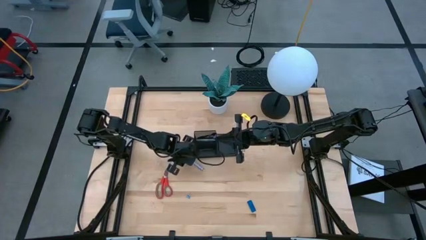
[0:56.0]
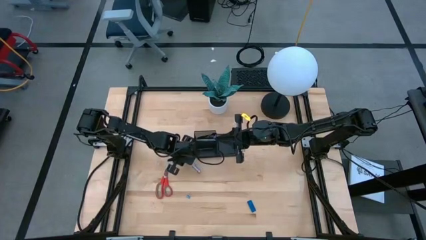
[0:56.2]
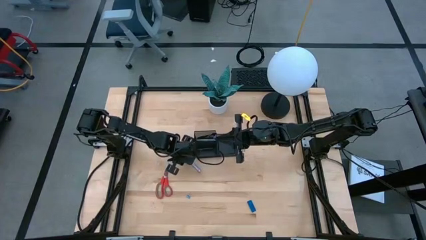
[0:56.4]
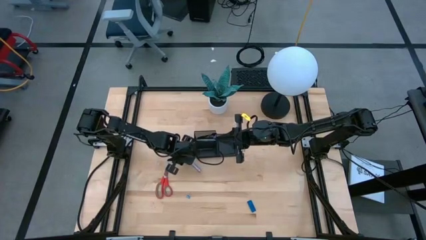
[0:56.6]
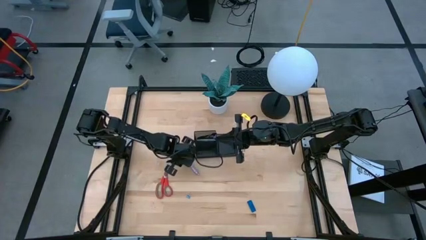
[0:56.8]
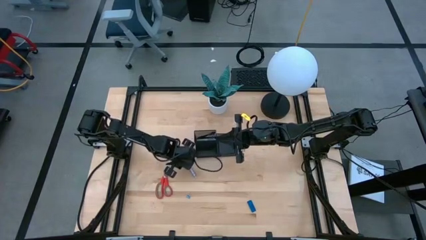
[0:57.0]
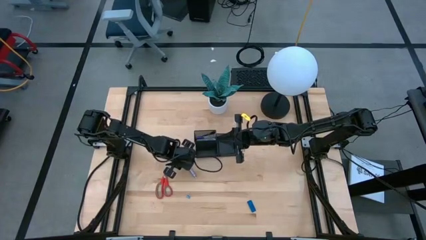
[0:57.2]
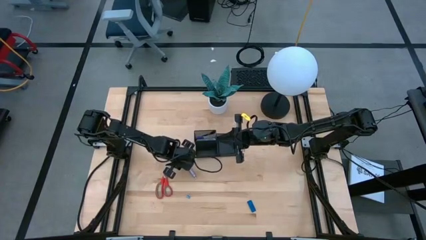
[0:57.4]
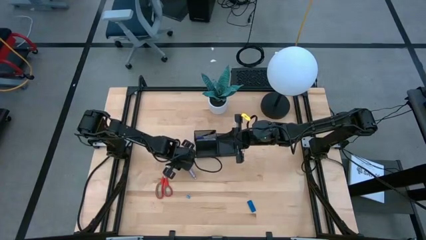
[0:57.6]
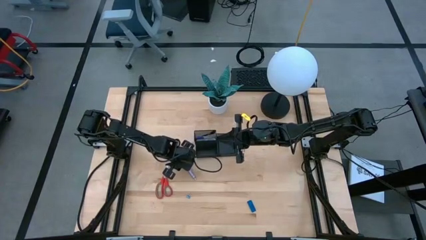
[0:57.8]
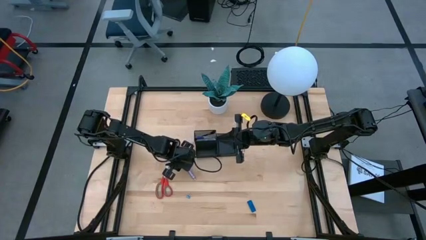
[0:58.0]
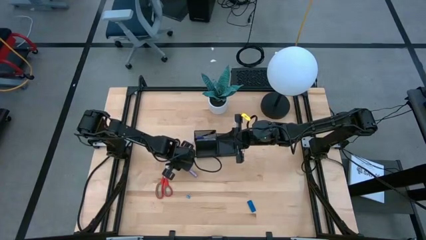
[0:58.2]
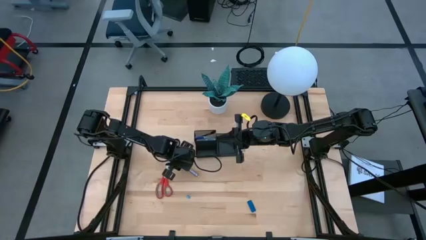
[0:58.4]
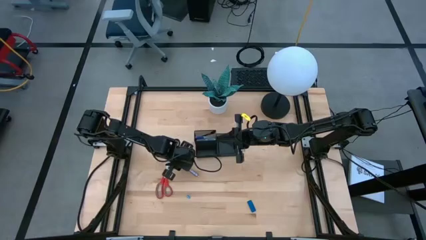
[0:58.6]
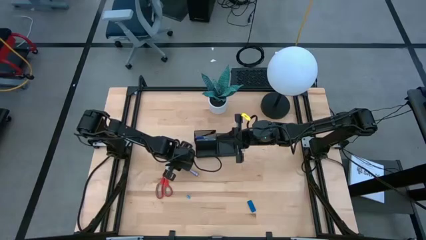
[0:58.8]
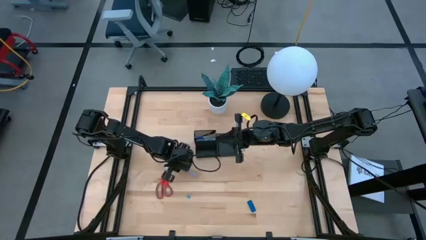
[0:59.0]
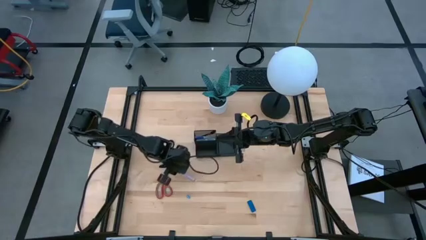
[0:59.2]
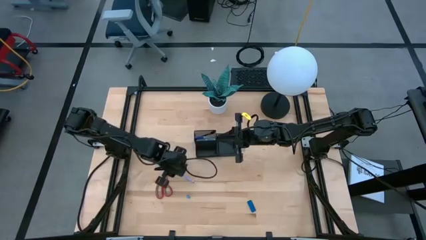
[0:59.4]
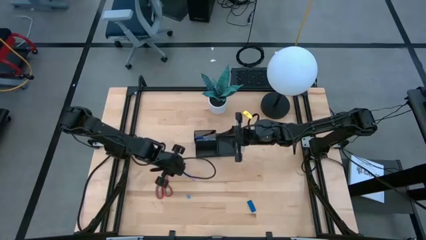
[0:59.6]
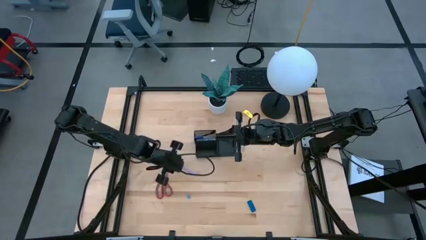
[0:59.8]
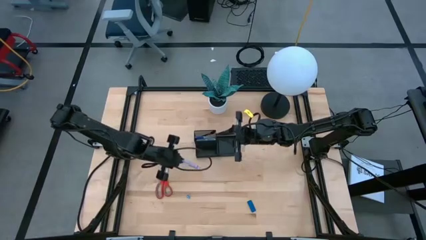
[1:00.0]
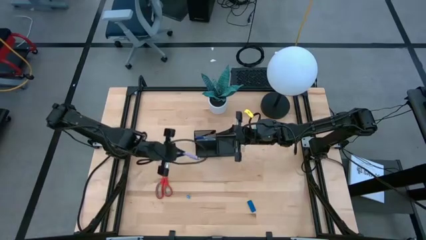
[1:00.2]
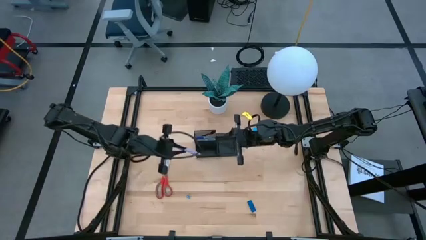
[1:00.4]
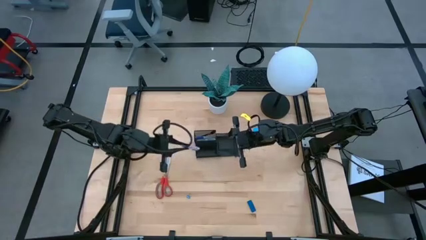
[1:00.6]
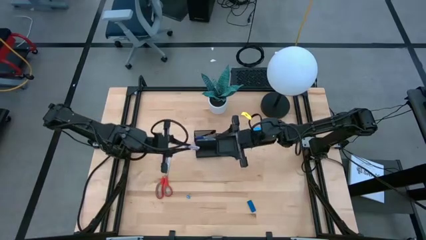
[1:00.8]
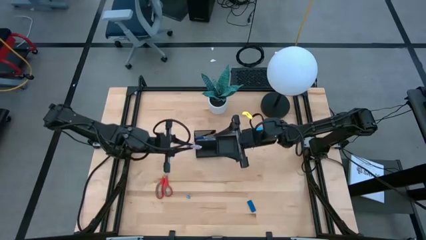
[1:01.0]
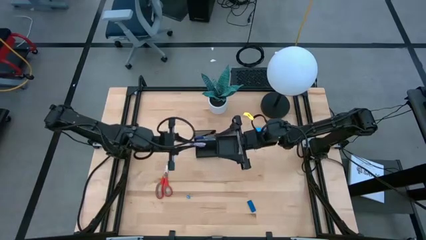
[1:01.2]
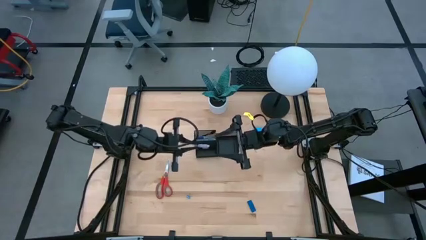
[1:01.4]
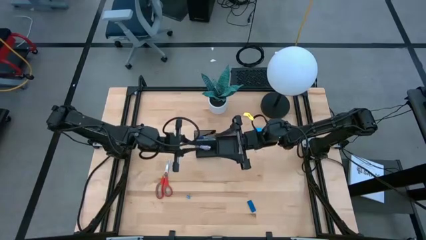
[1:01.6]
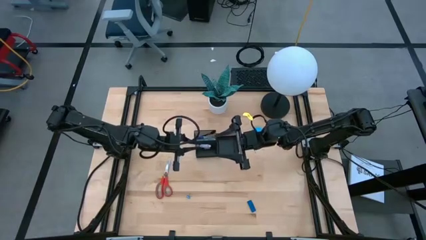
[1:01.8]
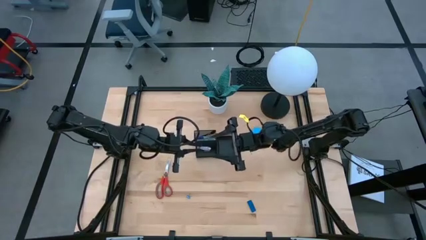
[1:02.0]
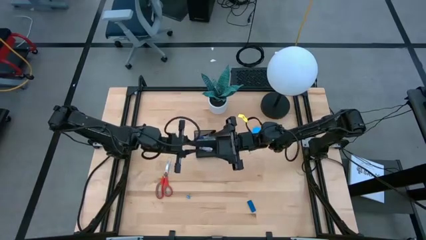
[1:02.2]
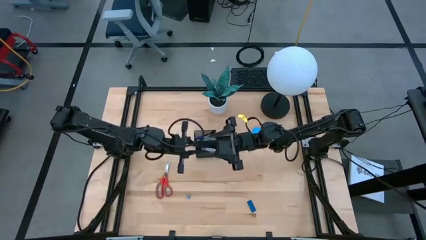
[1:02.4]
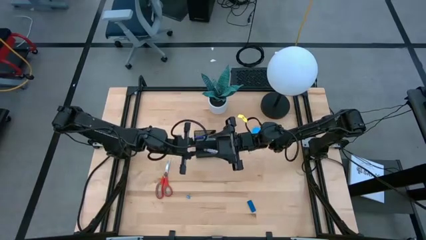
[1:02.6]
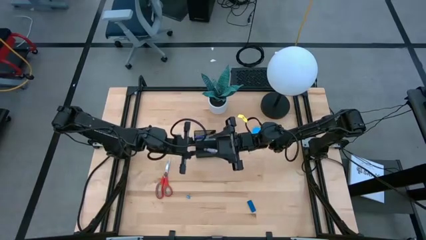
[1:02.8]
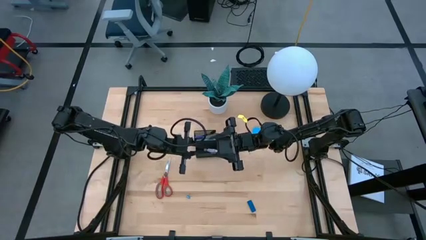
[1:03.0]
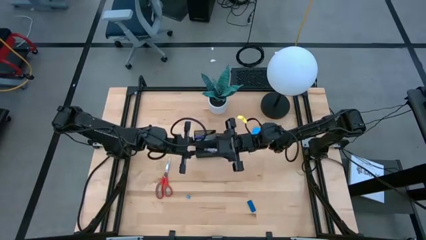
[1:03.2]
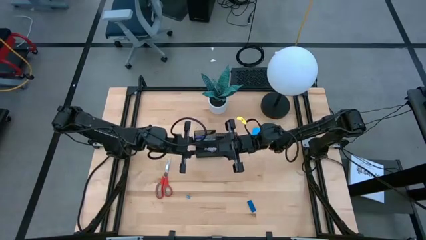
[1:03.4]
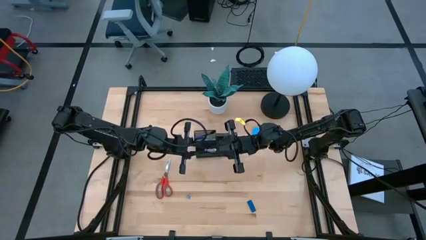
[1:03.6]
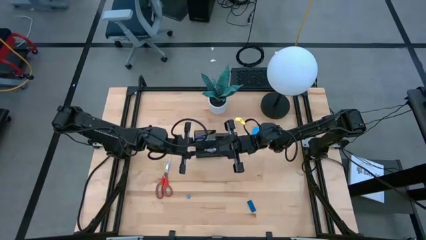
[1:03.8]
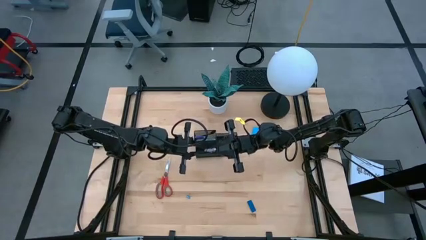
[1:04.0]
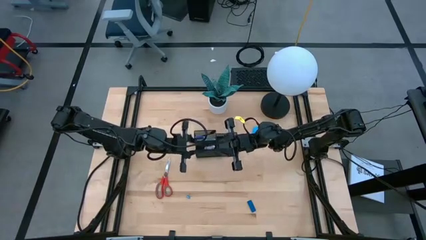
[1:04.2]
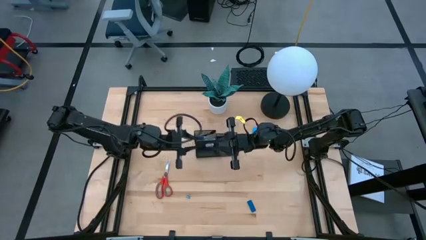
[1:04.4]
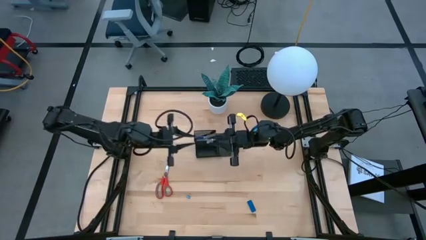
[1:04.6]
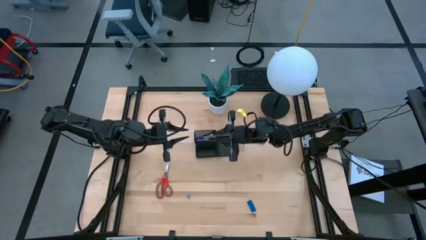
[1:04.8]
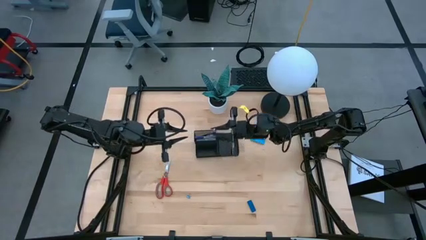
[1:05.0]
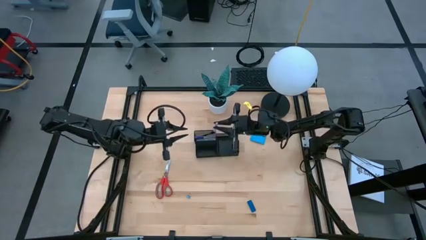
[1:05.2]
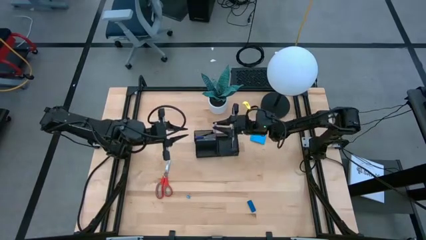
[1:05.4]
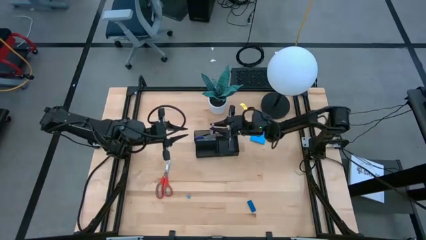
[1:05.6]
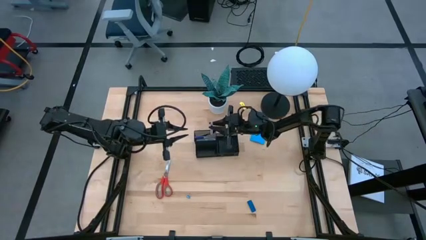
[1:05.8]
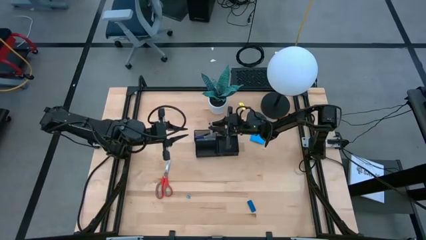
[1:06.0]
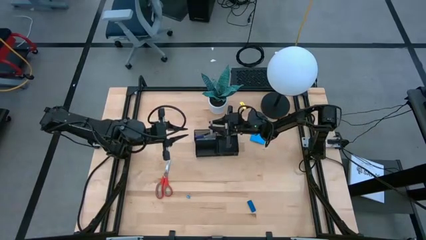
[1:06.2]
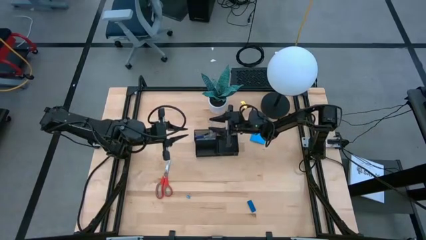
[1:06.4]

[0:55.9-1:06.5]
Task: Pick and place office supplies into organizer
Put the pink pen into the top left section of the desk organizer
